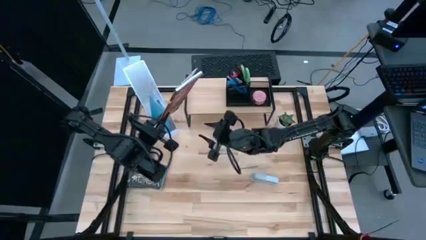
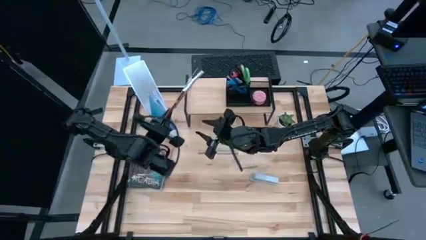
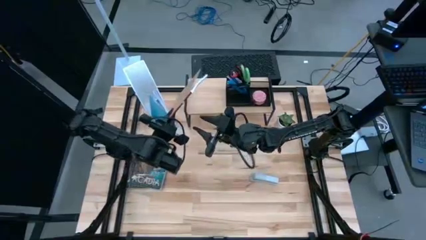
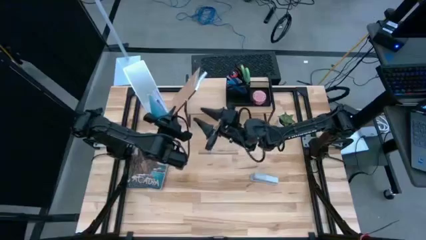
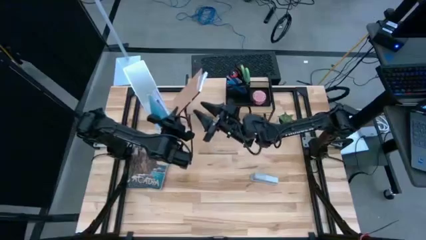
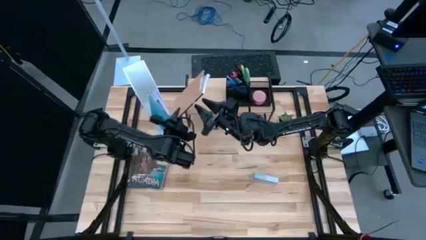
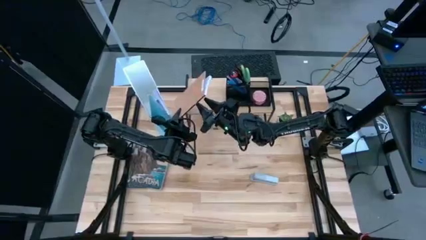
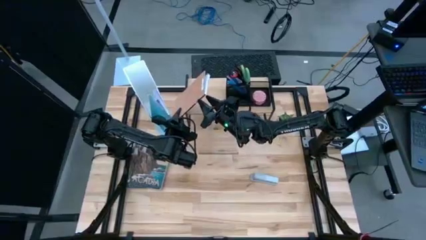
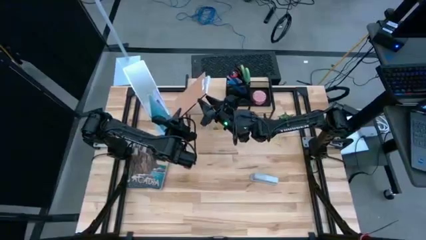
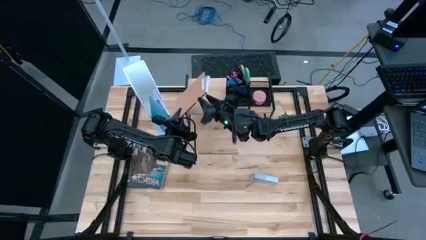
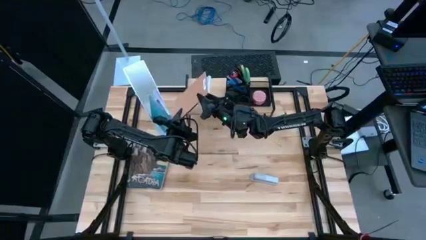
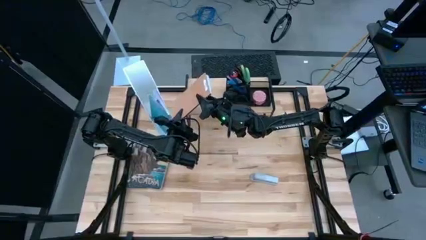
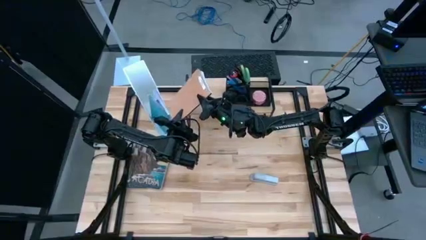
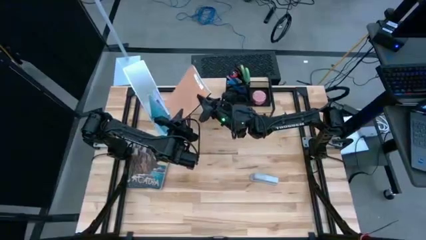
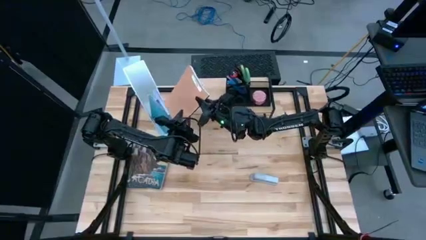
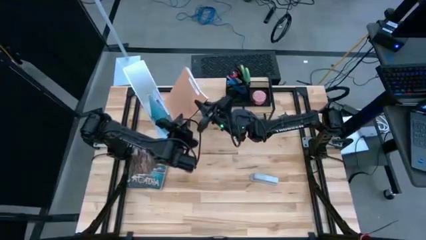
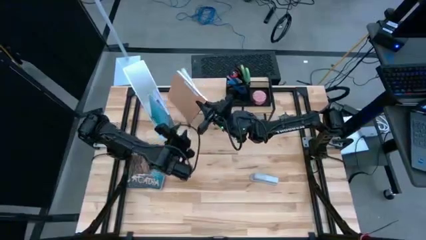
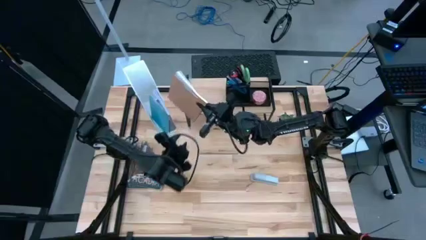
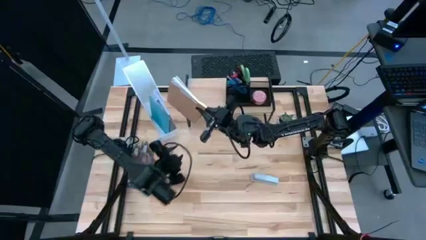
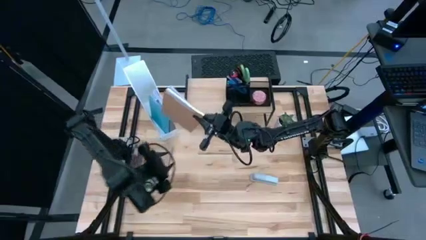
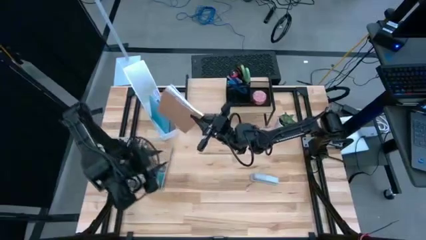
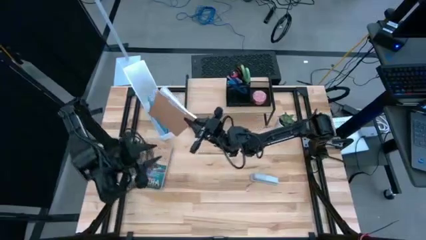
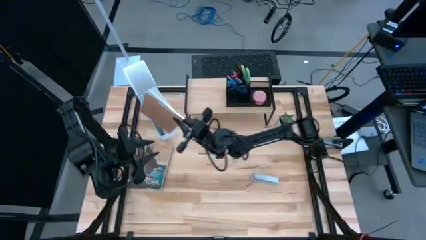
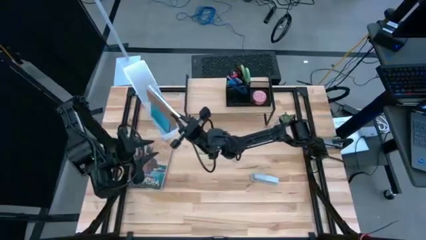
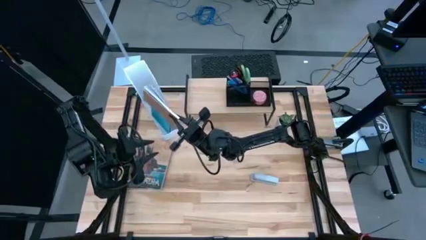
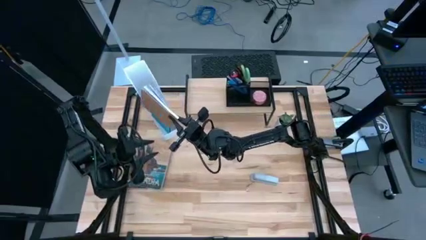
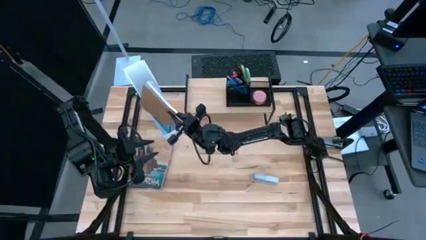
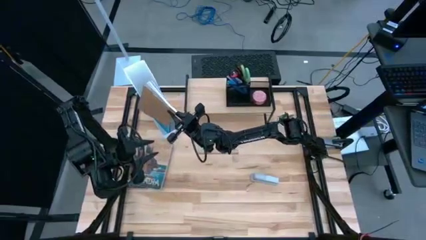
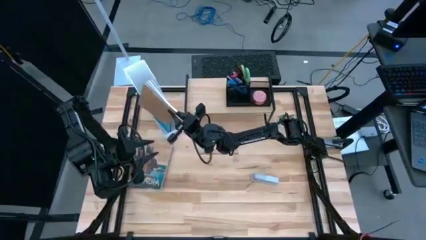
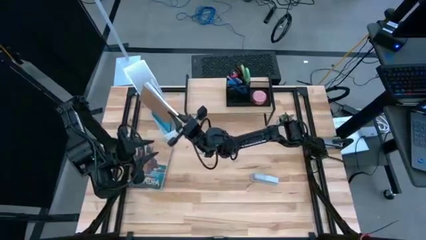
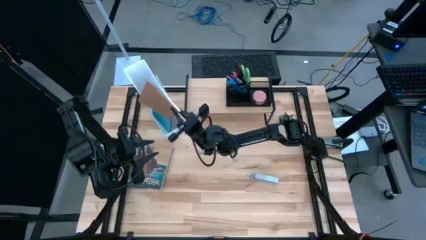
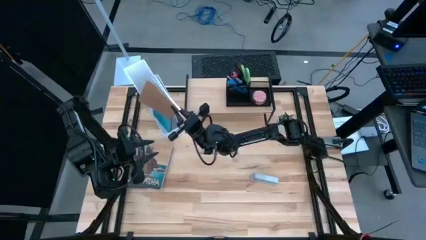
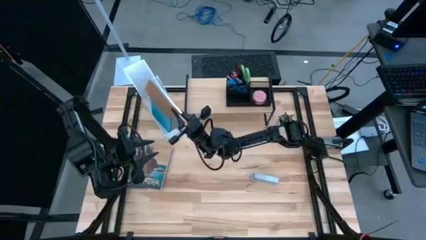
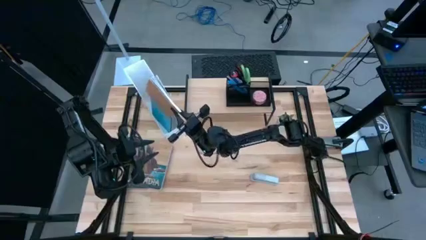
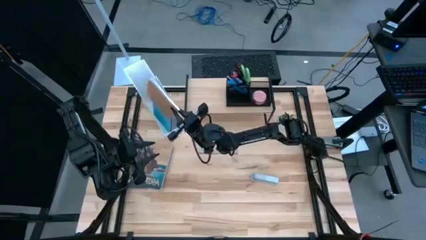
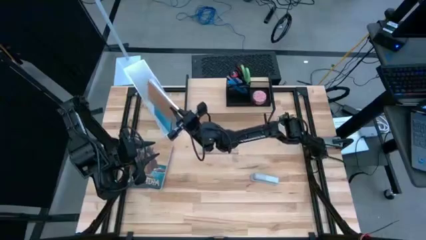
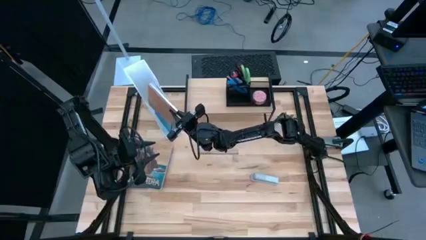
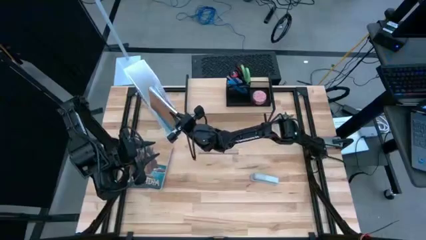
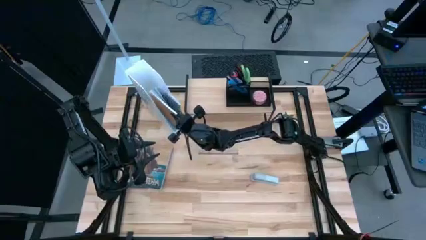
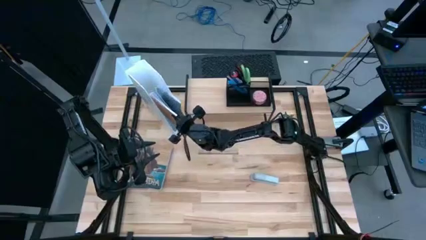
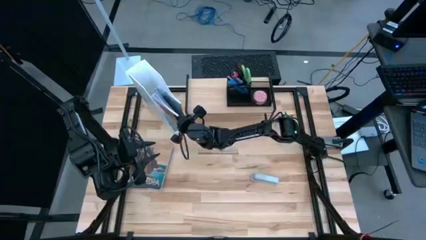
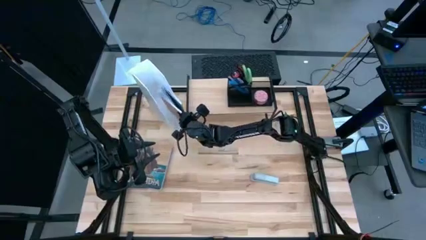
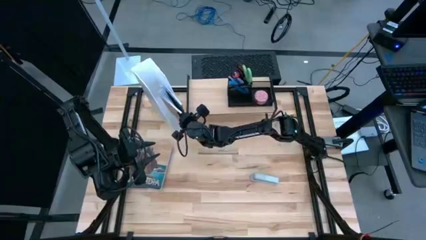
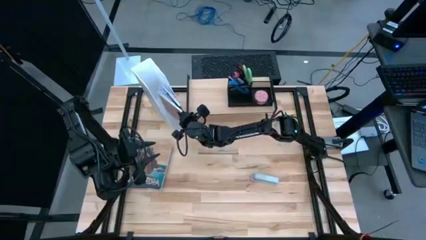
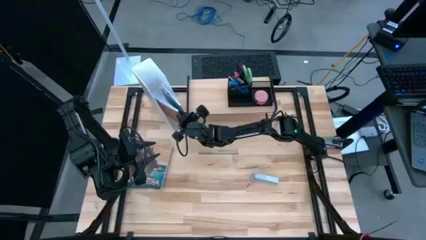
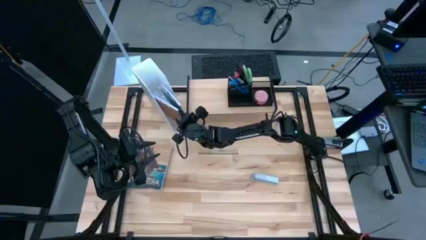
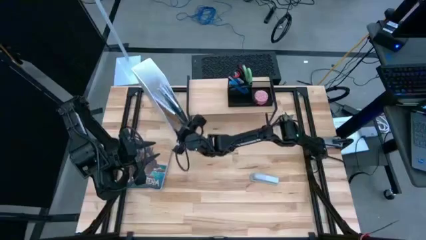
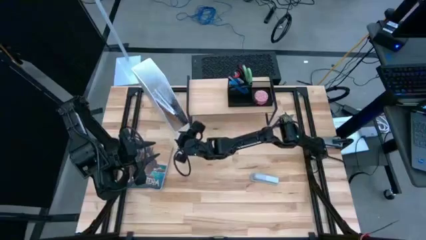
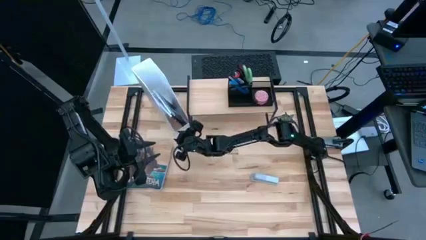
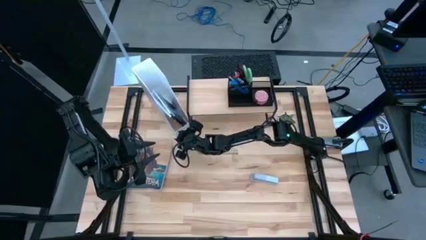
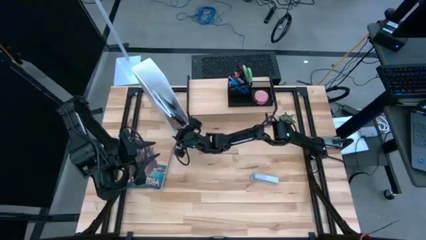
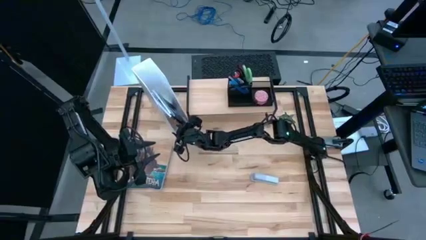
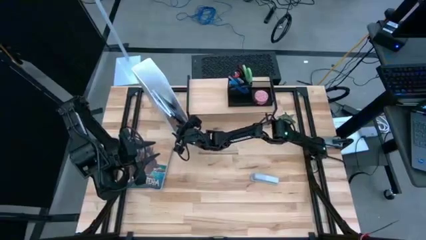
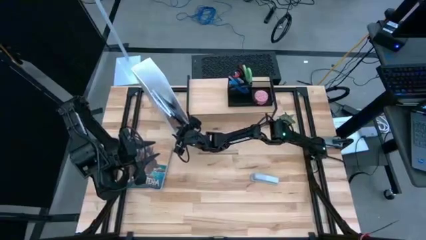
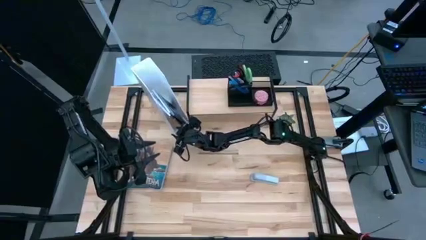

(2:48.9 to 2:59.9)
Task: Stock shelves
Put the purple book into the white bookshelf
